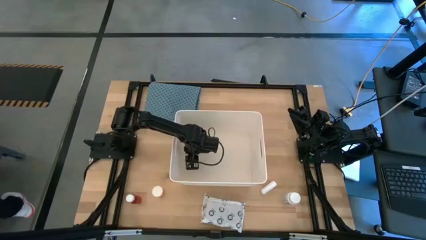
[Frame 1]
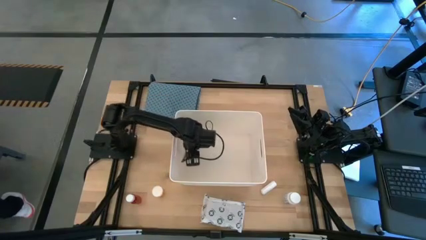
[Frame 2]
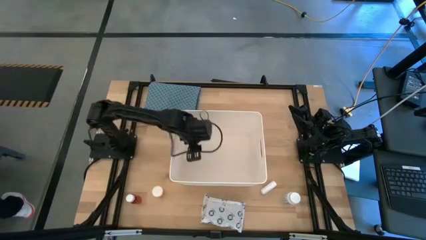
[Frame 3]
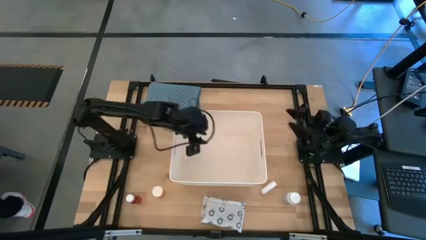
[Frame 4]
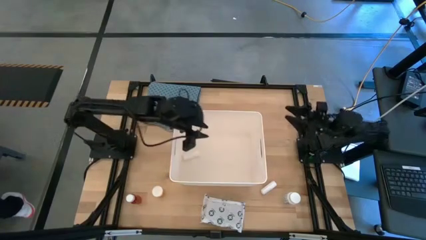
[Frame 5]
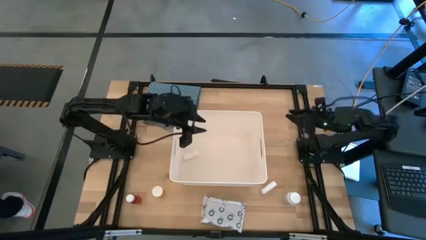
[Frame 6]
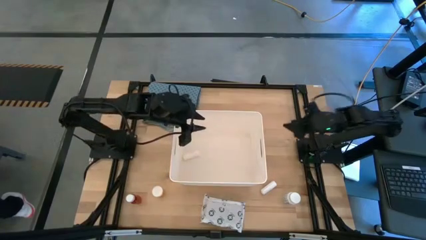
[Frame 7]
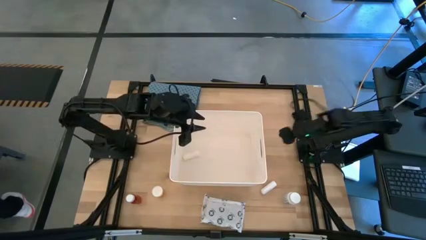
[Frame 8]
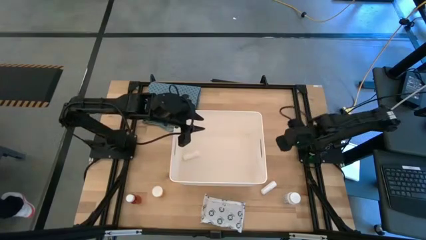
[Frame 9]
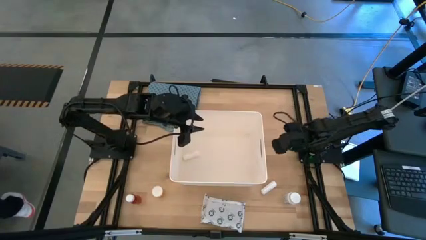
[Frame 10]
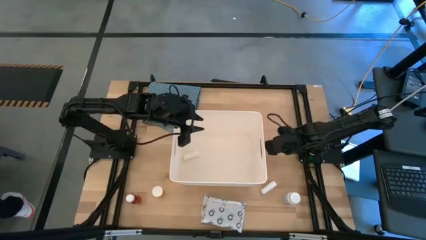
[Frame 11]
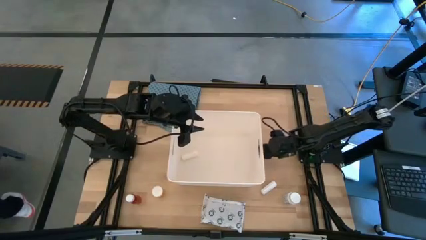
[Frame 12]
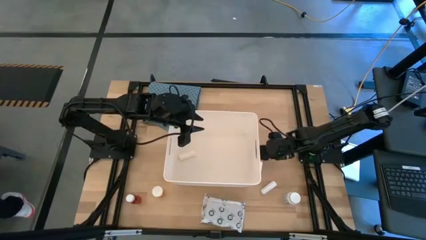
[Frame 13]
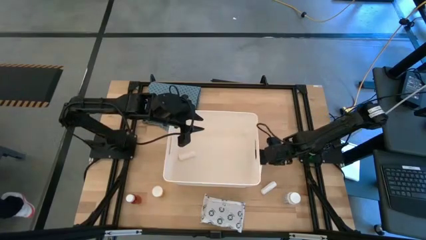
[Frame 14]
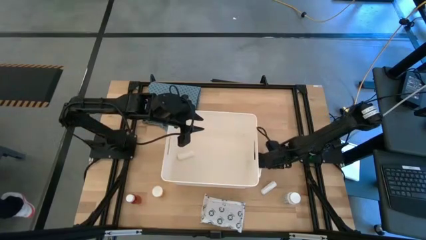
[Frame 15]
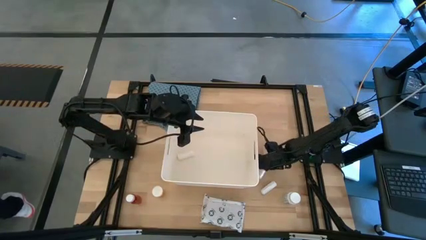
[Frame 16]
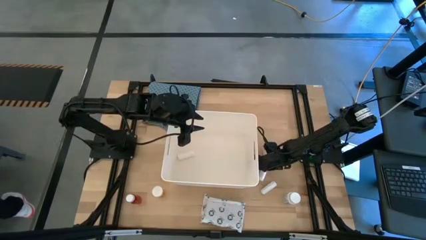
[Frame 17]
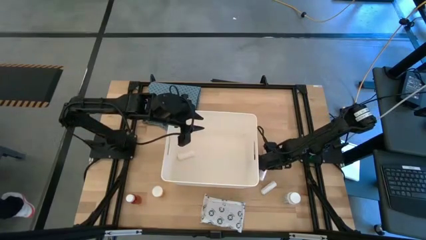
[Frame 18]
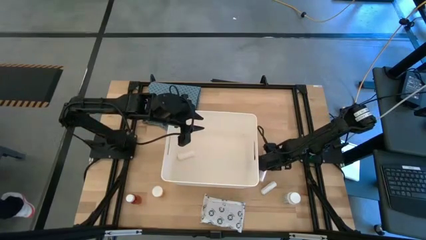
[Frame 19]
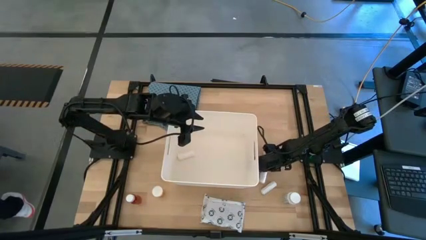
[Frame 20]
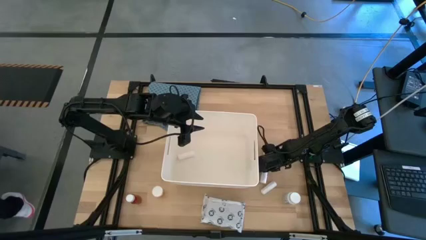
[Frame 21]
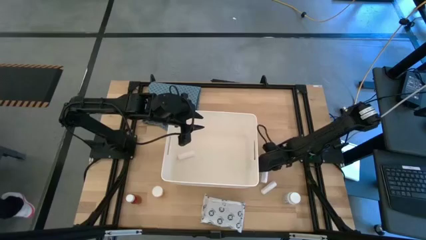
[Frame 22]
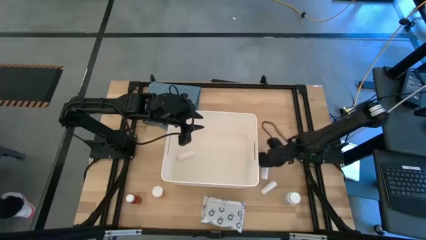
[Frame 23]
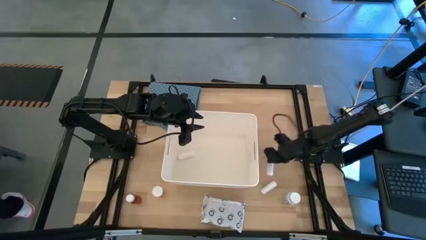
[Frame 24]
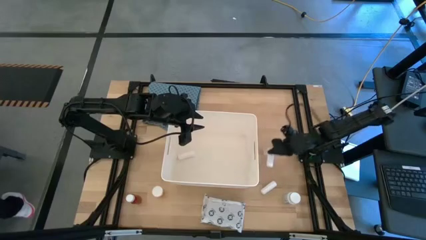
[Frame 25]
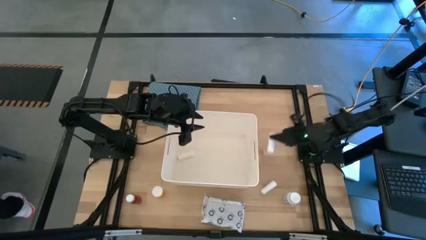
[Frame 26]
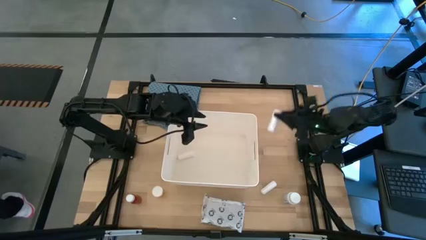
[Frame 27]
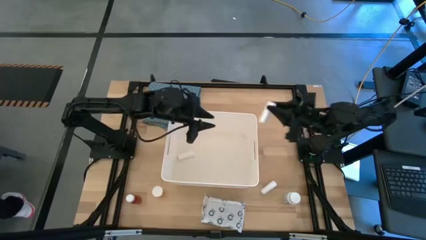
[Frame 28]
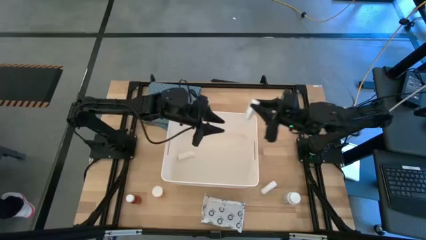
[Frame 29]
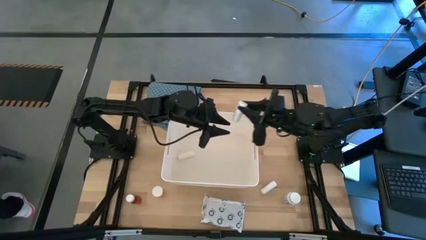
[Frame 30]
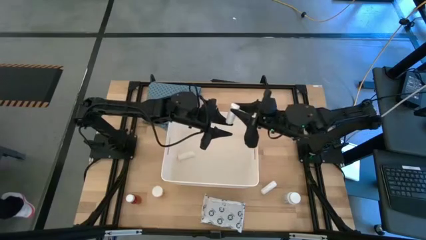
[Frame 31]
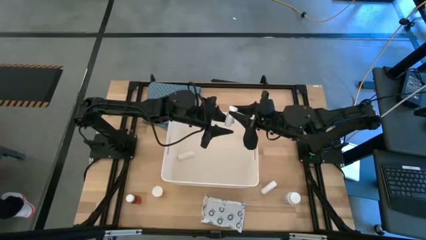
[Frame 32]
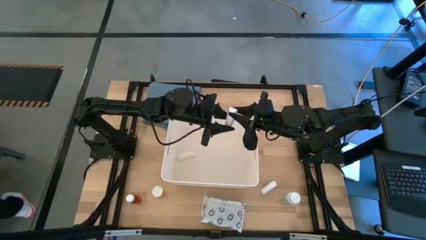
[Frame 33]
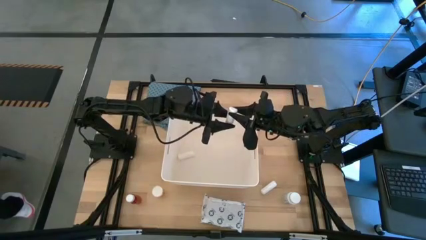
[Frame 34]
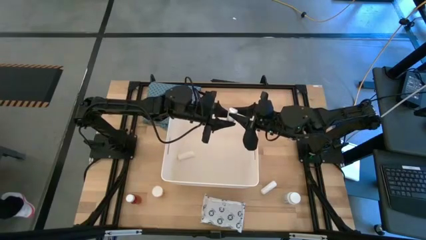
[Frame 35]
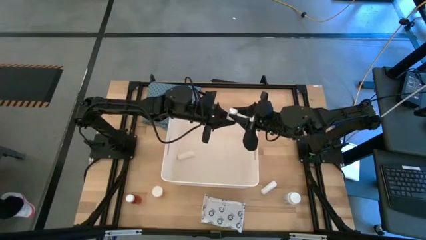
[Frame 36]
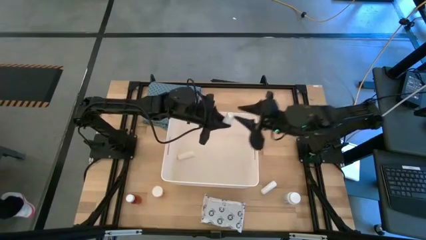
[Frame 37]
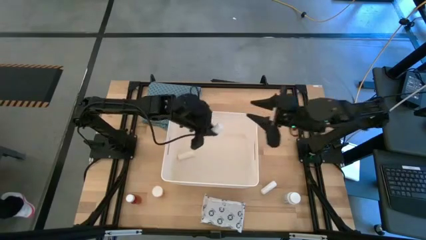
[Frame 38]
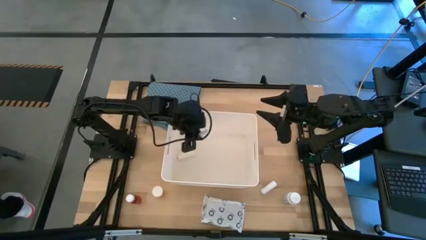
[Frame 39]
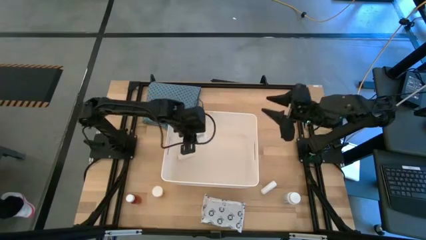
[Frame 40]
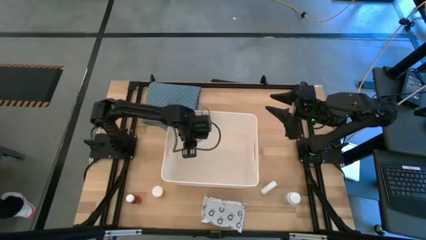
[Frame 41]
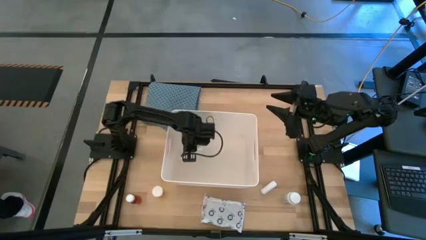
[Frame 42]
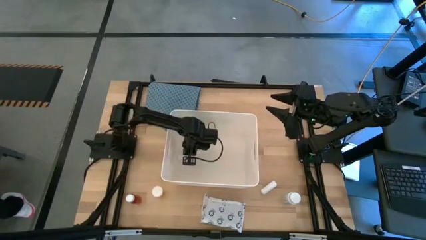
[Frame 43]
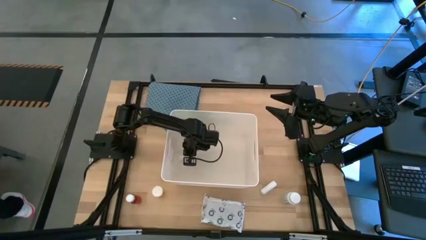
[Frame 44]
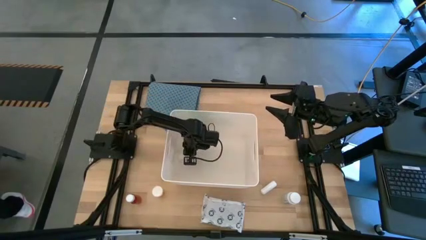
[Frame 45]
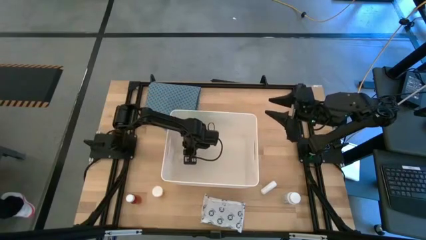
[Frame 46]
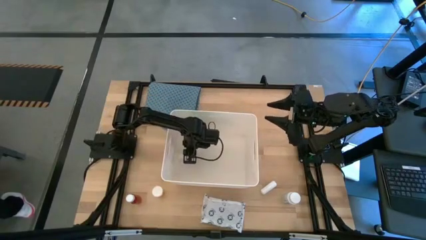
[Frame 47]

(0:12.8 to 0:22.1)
Task: Pick & place medical supplies in basket/bin
Put the top white rolled gauze into the white basket

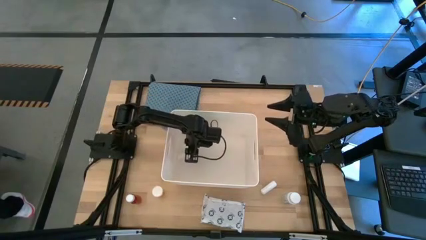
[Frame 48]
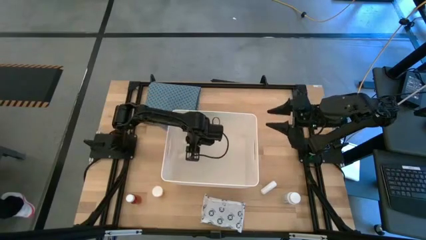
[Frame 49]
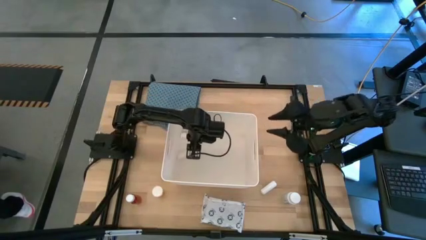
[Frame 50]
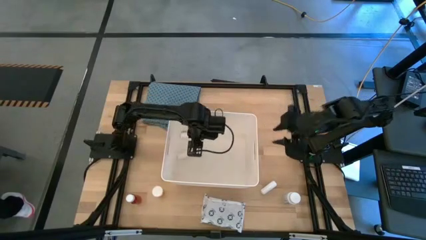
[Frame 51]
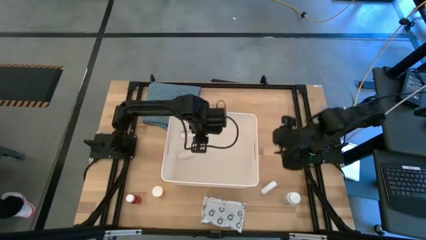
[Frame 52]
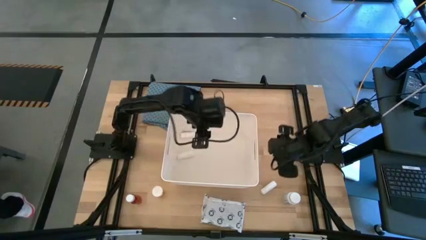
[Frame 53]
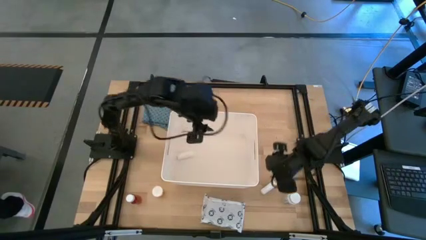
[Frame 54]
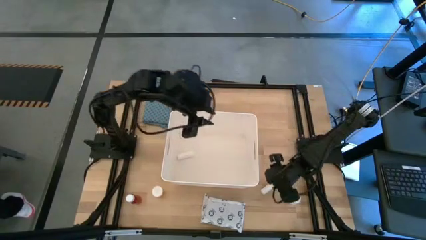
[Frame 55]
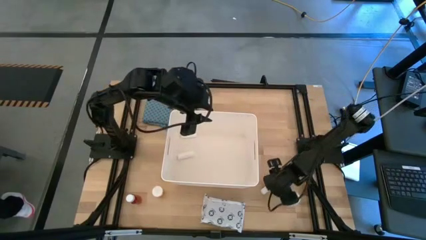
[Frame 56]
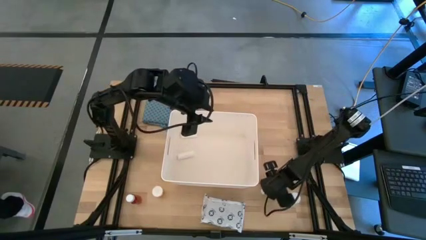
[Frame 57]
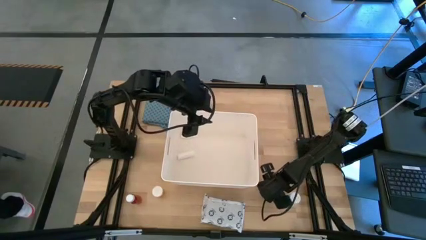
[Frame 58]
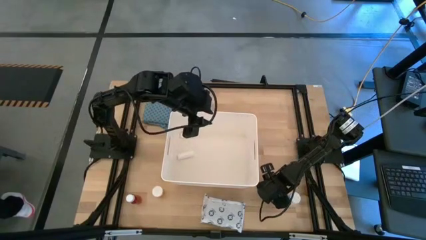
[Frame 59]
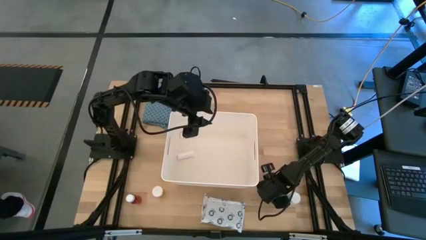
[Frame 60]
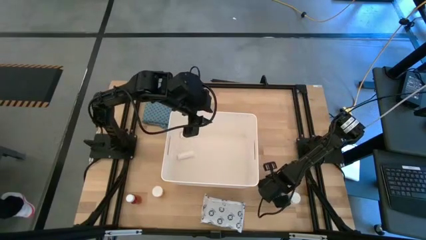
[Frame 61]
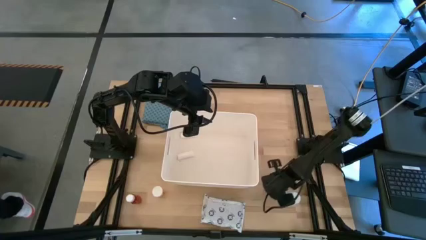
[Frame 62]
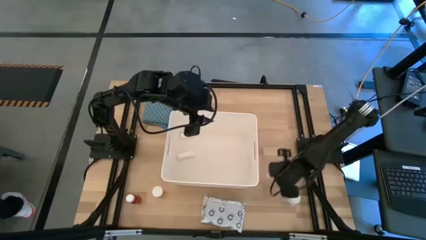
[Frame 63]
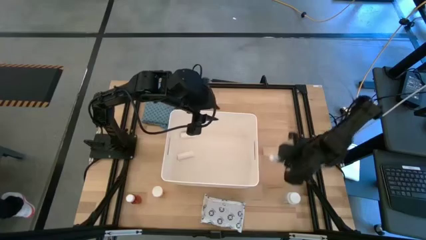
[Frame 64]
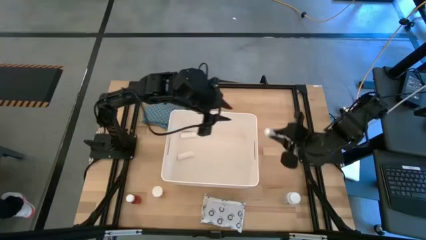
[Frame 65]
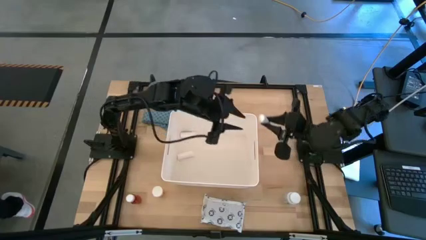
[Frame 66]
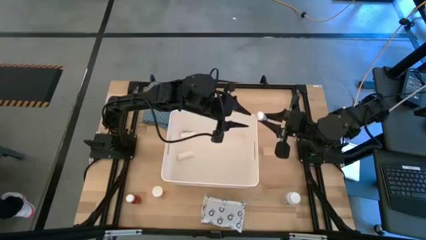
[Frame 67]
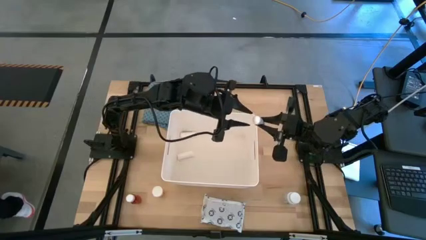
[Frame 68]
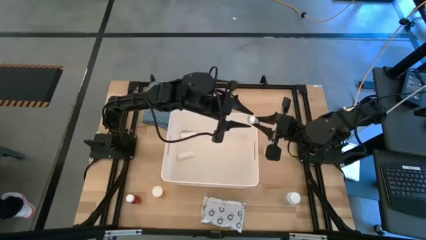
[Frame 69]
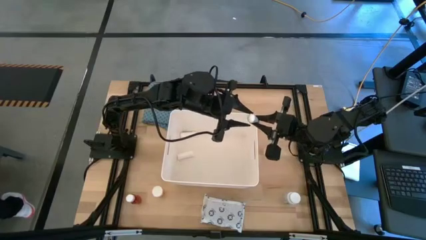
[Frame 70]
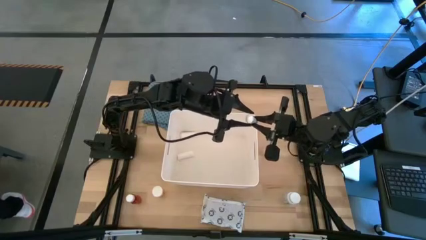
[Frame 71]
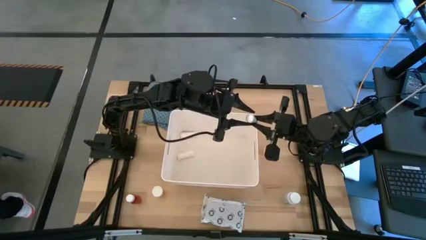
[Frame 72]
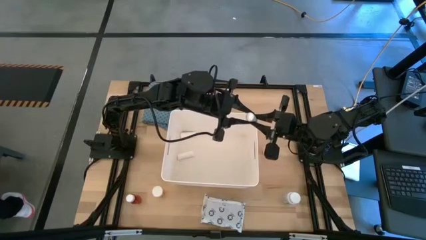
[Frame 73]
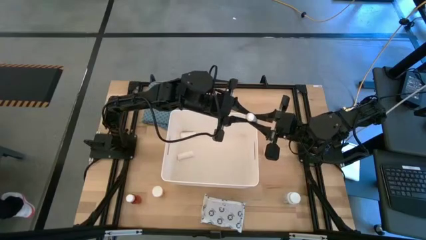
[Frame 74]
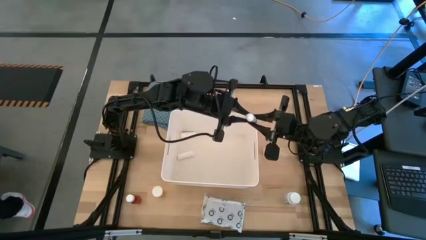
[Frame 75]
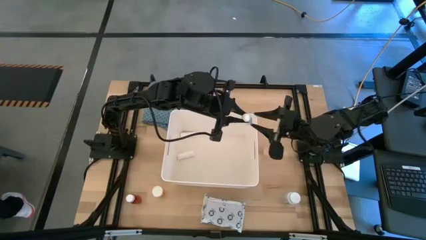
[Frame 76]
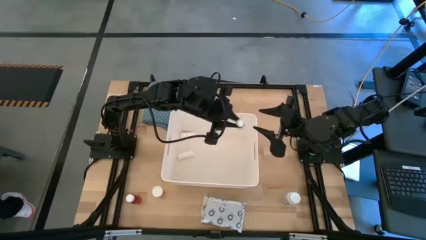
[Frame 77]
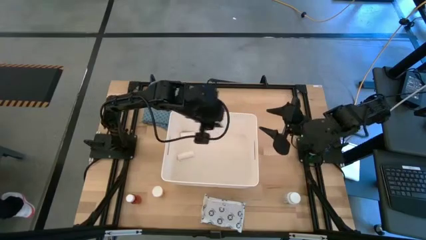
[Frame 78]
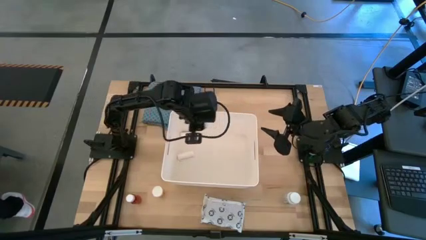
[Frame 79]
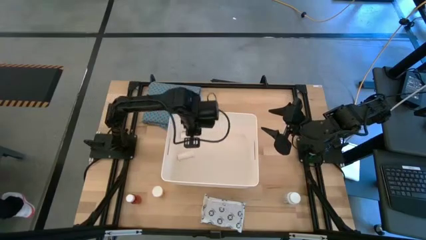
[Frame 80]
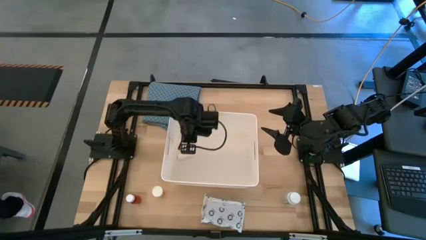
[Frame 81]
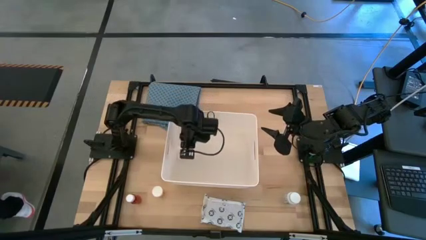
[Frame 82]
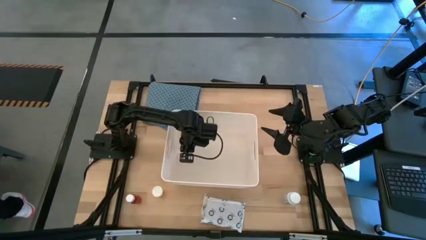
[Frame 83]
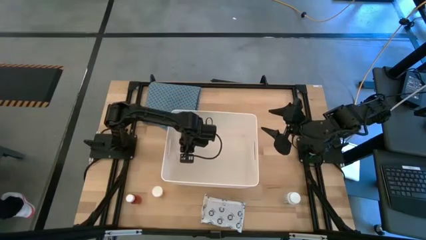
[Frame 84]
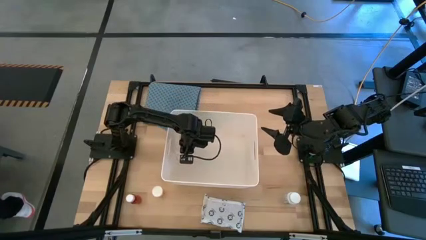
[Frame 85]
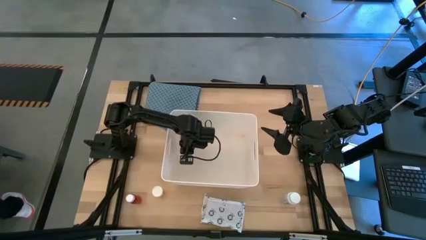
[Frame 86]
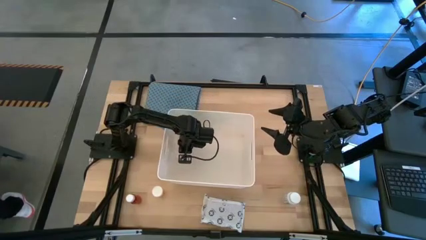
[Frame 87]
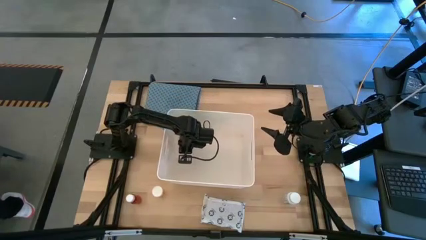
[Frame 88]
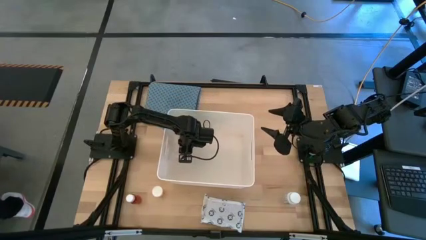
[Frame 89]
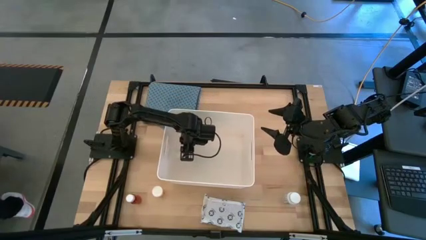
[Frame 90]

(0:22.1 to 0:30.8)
Put the white rolled gauze into the white basket
